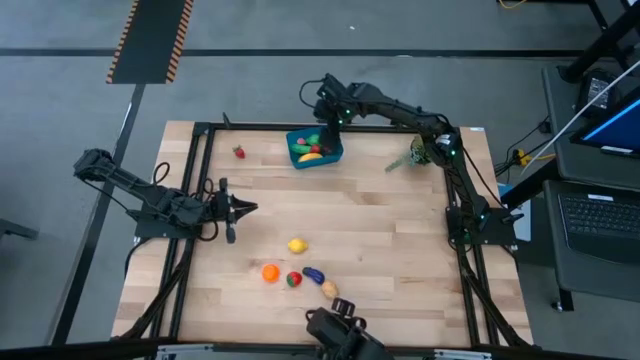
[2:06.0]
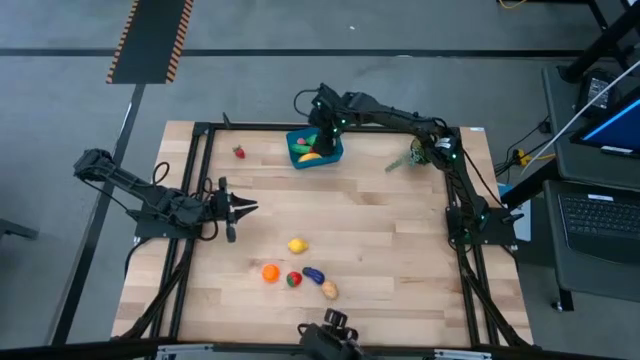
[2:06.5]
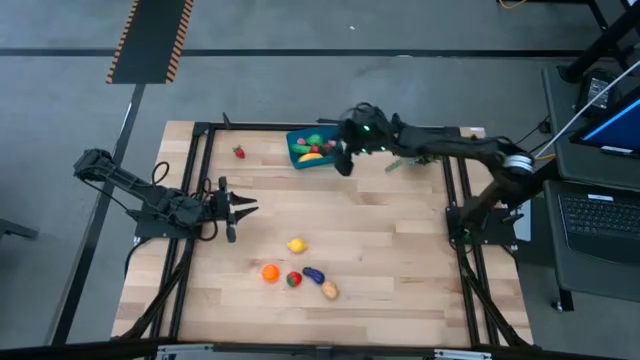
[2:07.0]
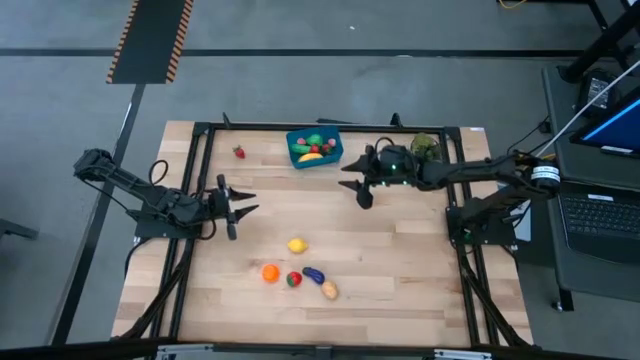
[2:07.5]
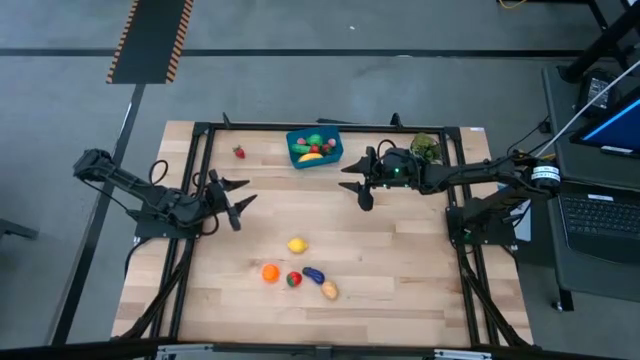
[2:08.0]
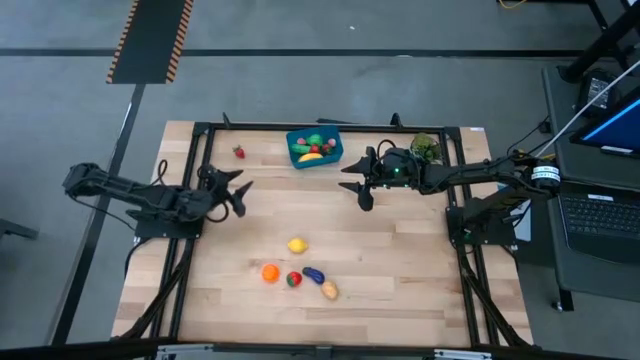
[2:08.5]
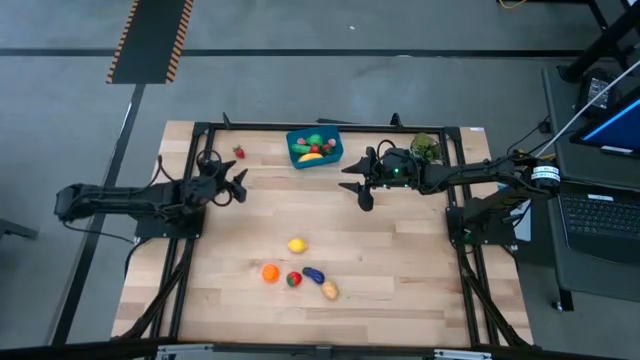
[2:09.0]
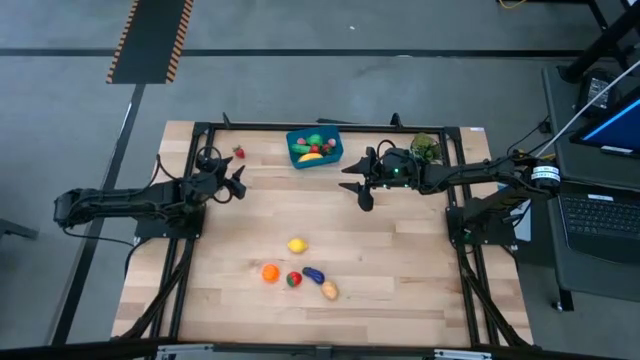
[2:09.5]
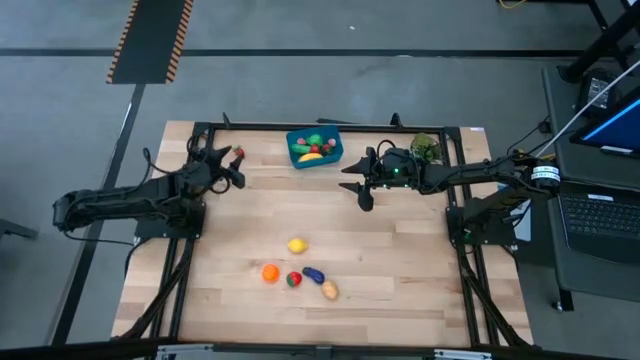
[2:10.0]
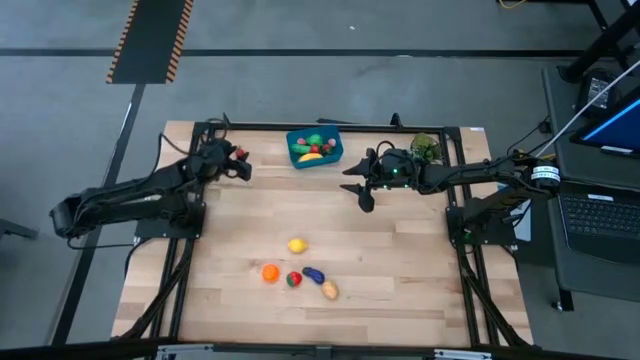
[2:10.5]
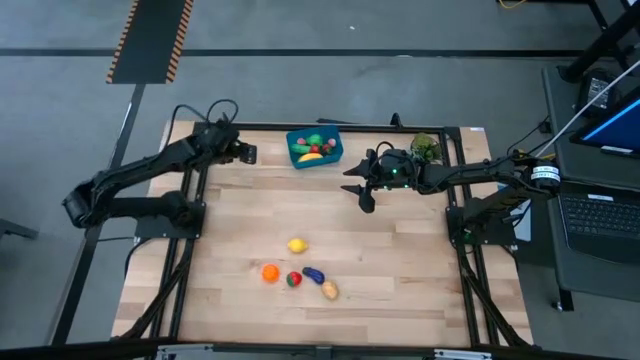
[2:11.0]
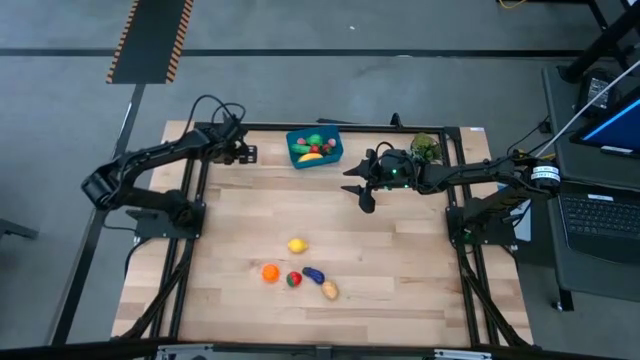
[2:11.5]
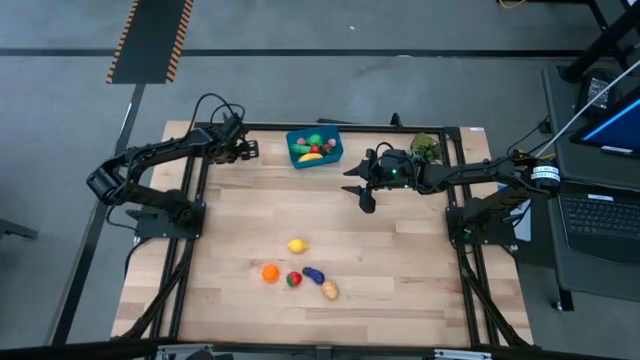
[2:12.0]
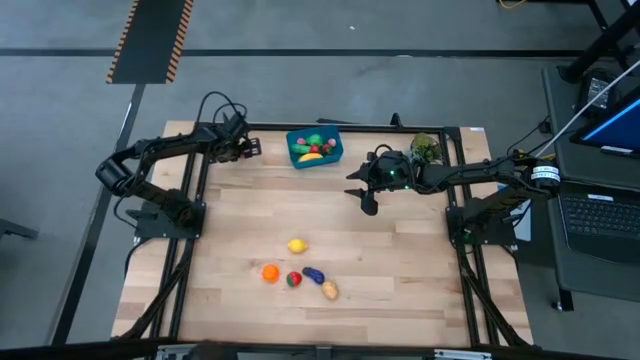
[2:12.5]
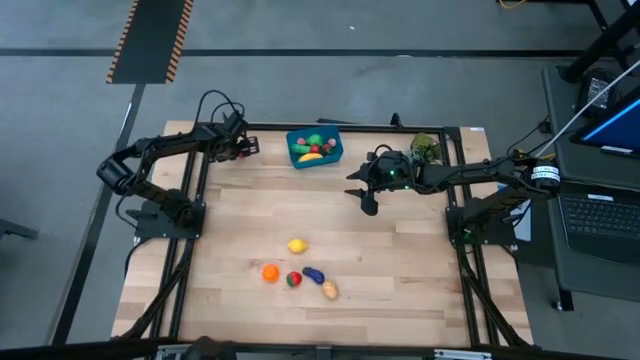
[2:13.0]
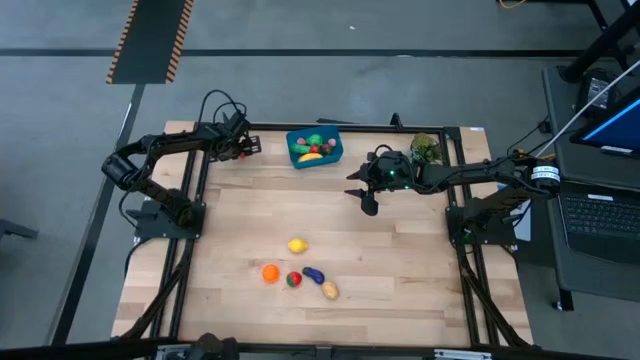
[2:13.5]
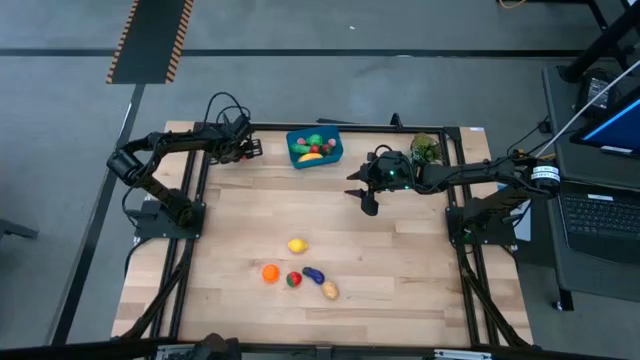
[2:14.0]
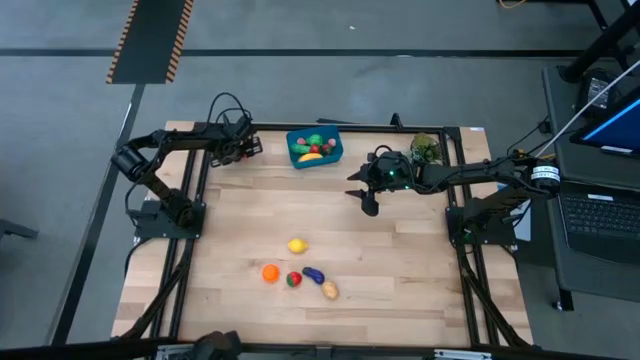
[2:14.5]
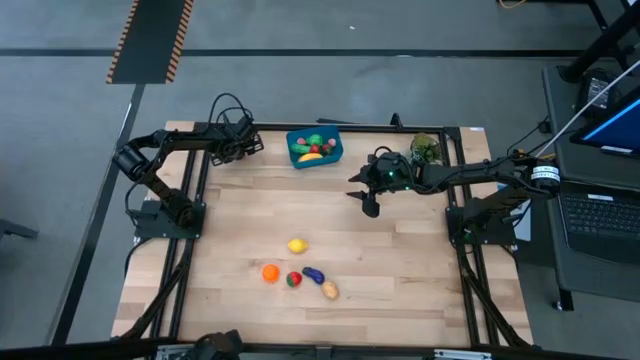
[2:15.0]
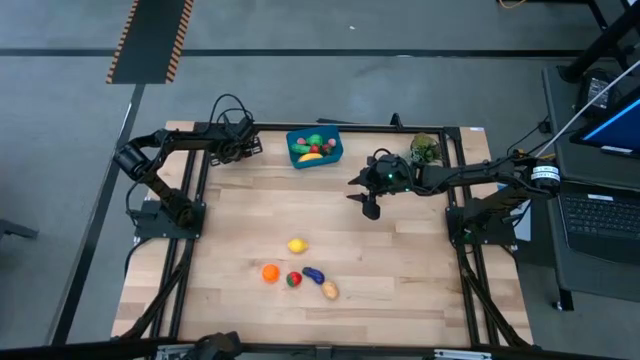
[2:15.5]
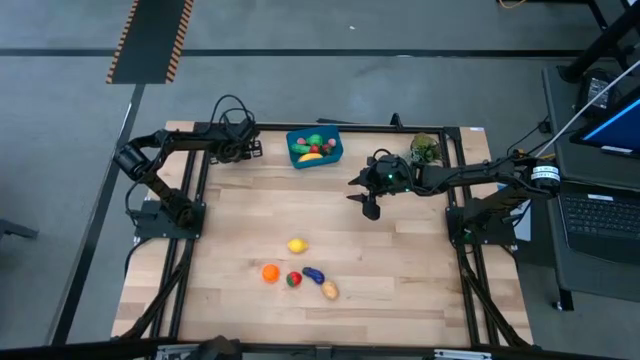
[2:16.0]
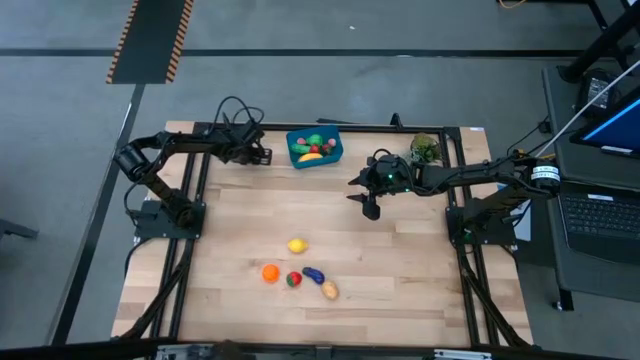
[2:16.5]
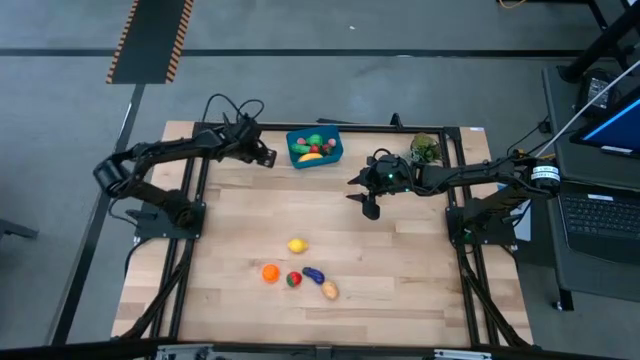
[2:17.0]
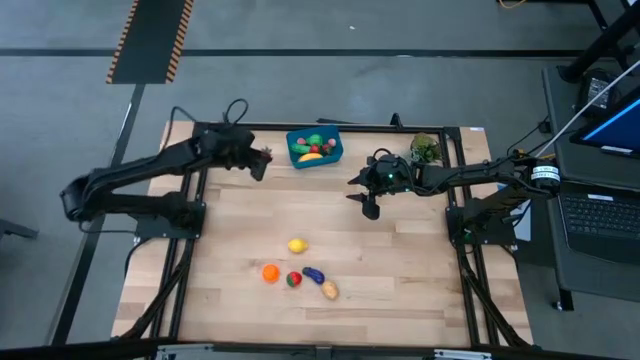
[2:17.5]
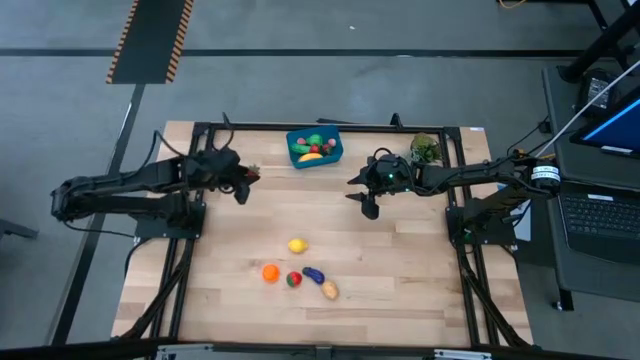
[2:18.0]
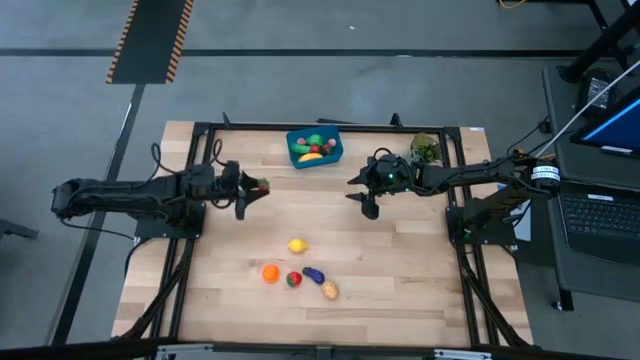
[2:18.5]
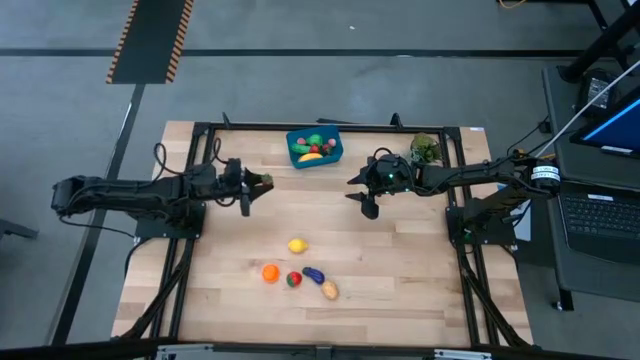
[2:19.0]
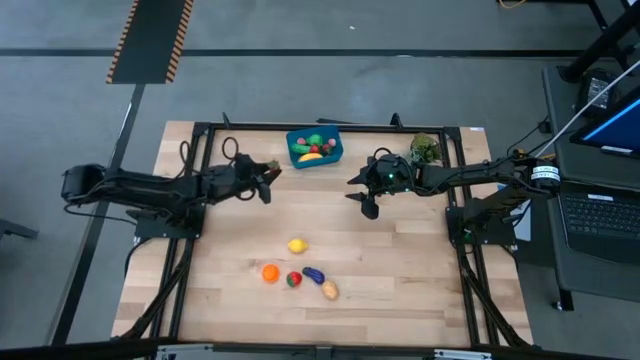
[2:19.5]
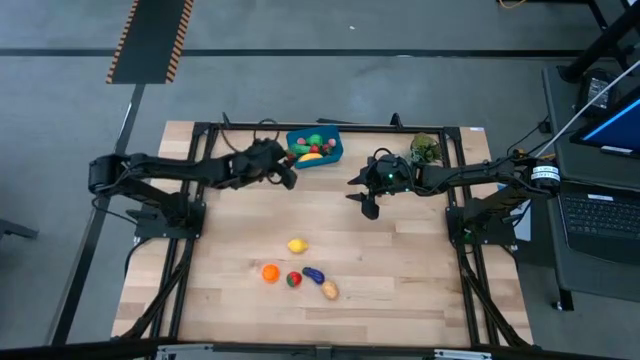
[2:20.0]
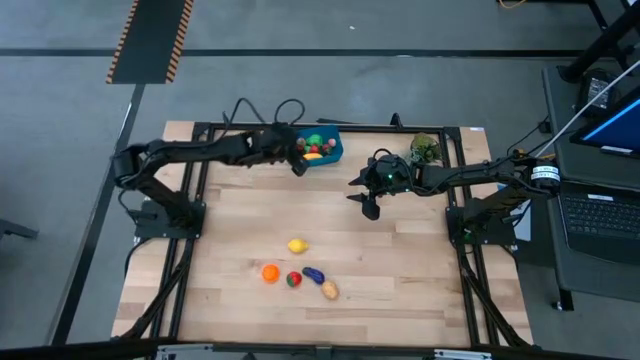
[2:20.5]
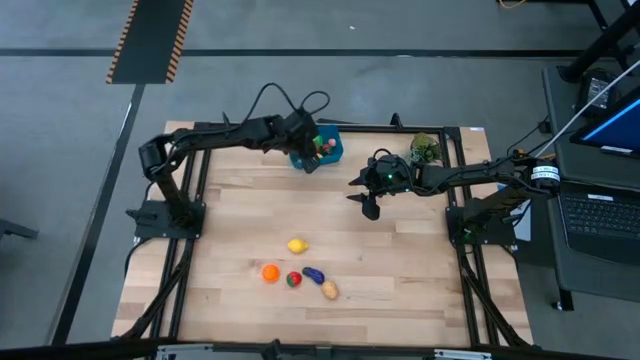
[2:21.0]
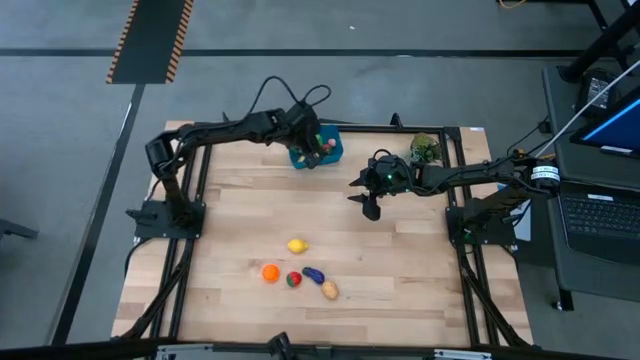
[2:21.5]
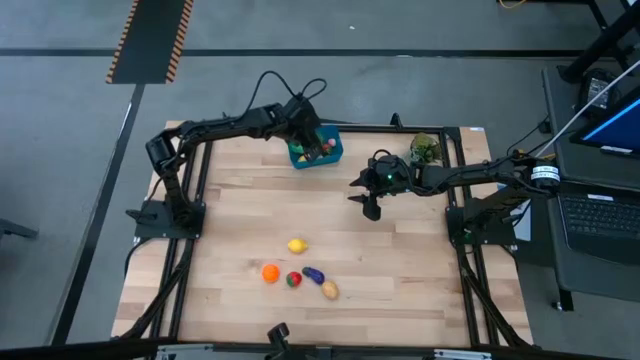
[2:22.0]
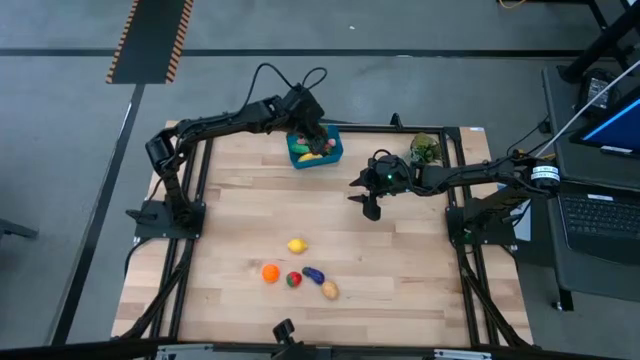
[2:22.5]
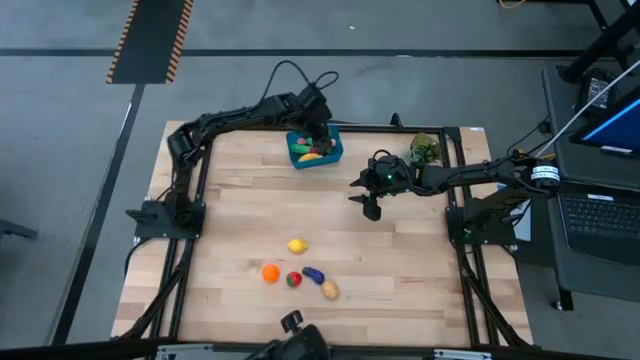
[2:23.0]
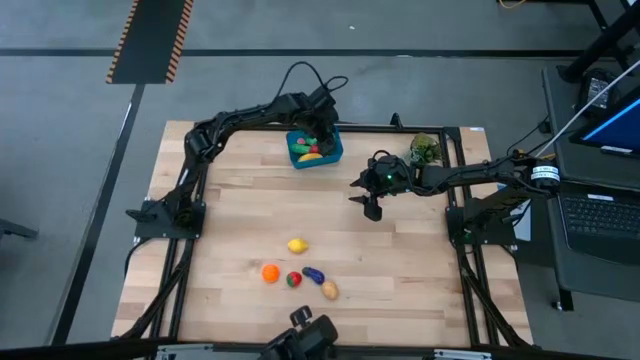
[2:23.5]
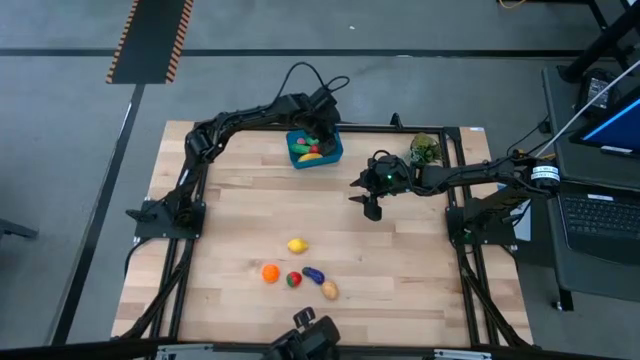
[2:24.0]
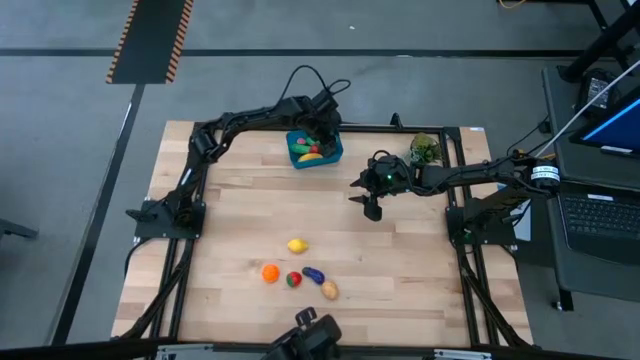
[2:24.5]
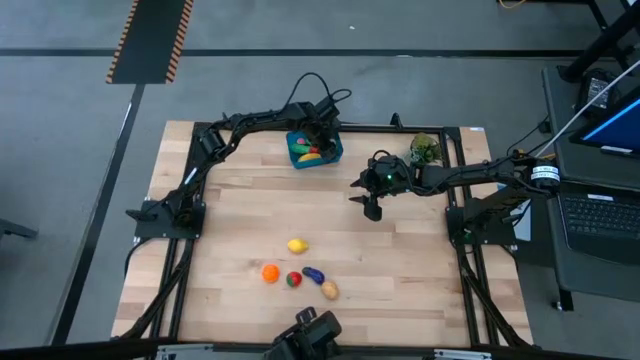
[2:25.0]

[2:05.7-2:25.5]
Task: Pick and placing Produce into tupperware
Put the strawberry into the blue bin

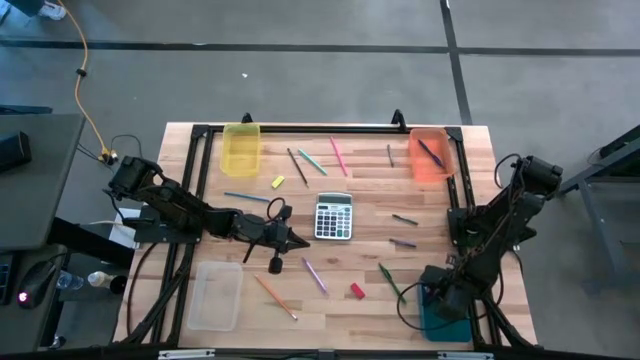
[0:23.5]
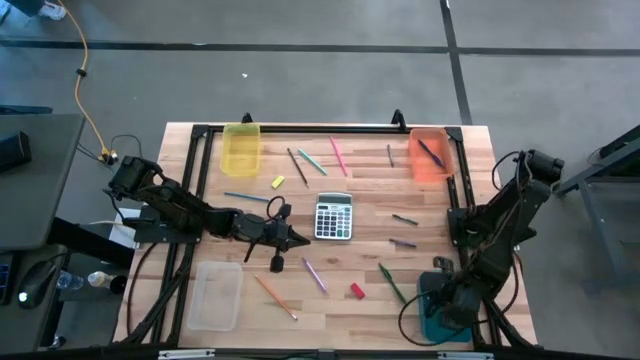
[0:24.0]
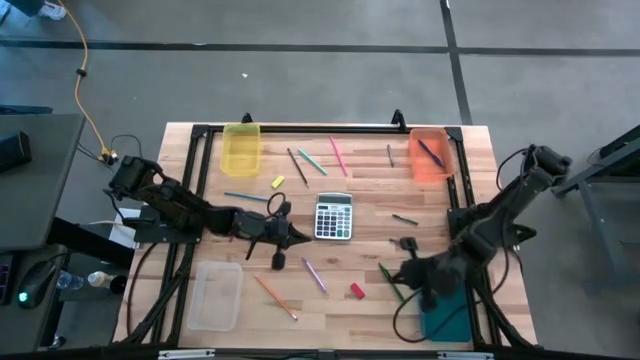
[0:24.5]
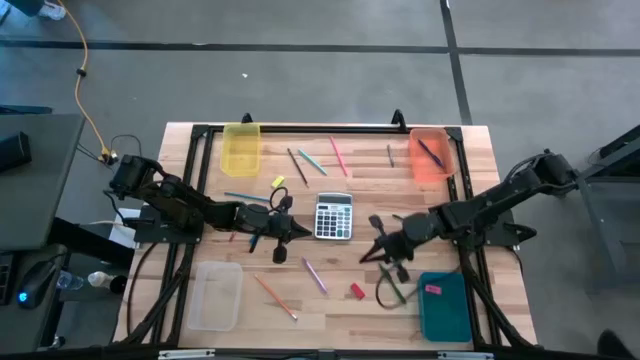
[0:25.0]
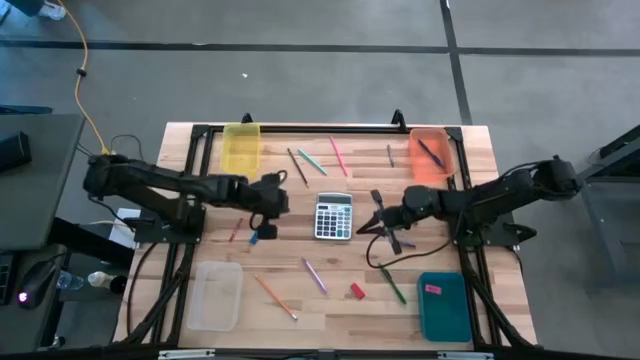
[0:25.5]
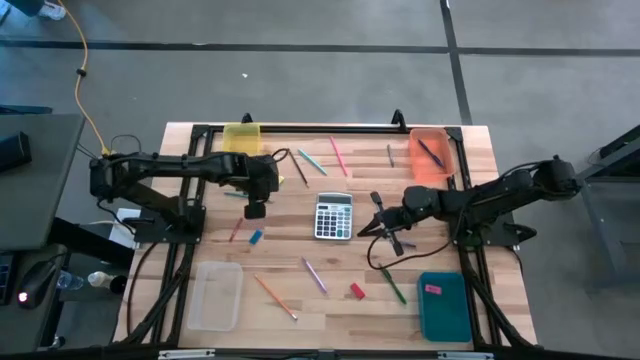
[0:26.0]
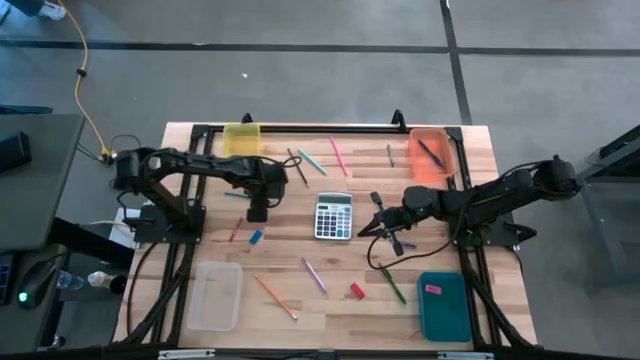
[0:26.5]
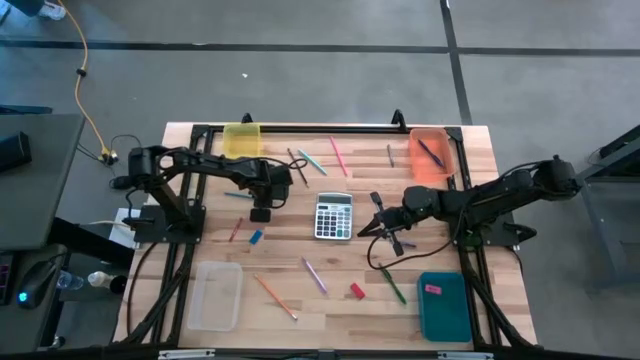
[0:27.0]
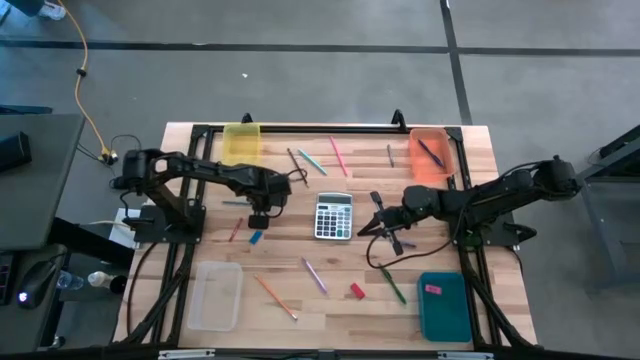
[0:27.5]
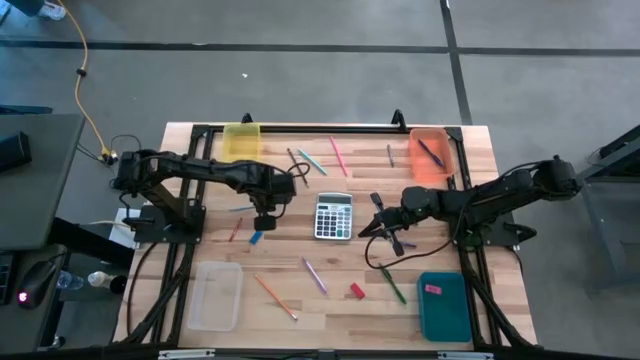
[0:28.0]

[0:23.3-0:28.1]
Task: Sort crayons/erasers/pens/pencils in bins
Put the blue colored pencil into the transparent bin
